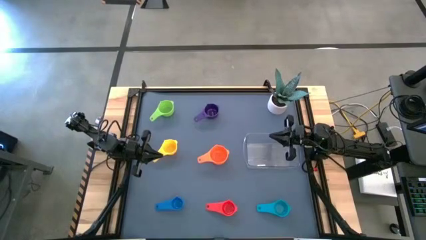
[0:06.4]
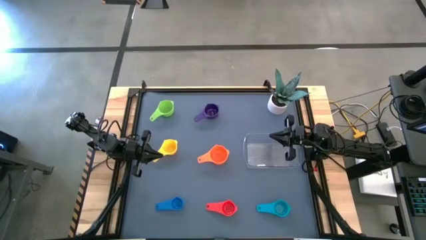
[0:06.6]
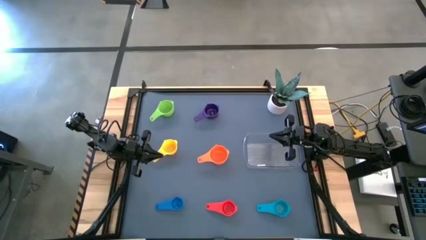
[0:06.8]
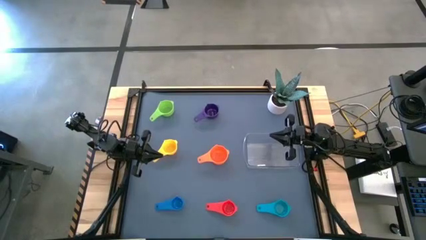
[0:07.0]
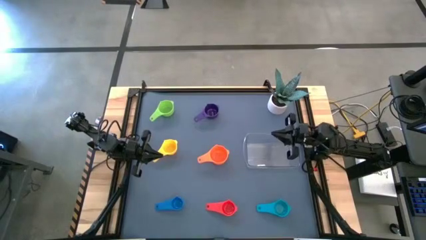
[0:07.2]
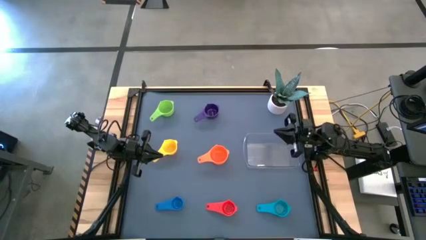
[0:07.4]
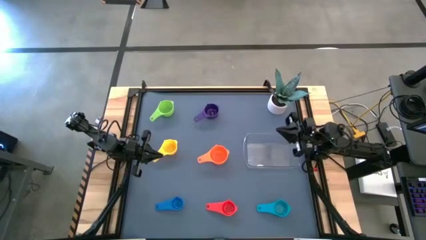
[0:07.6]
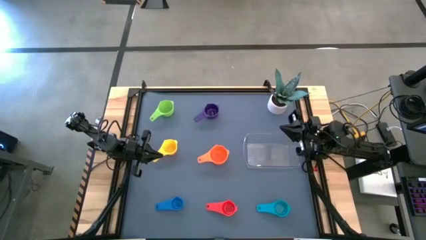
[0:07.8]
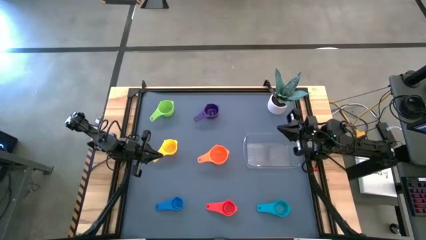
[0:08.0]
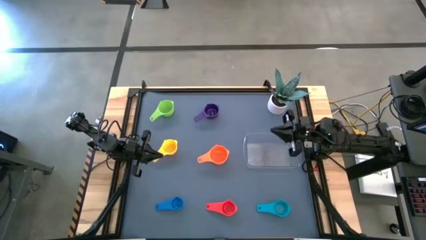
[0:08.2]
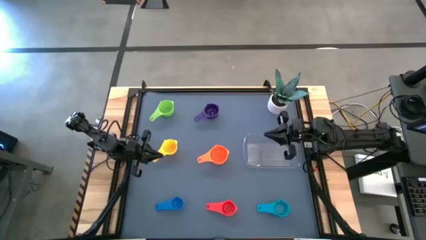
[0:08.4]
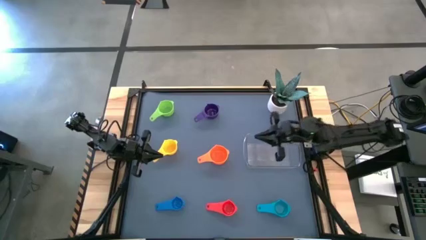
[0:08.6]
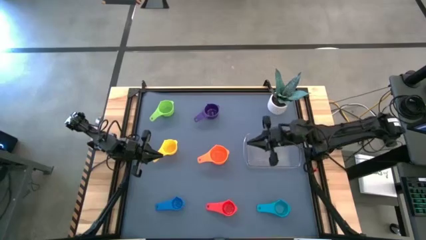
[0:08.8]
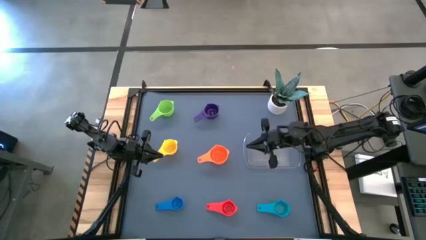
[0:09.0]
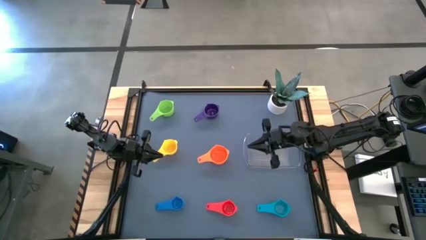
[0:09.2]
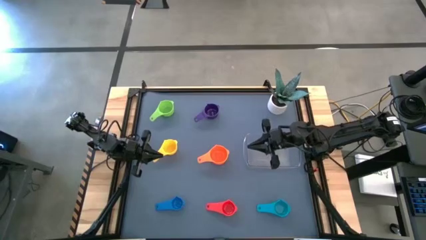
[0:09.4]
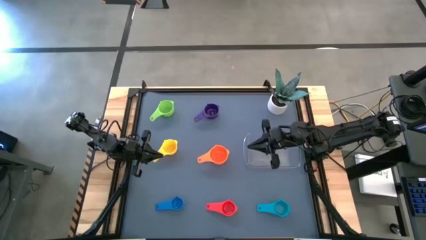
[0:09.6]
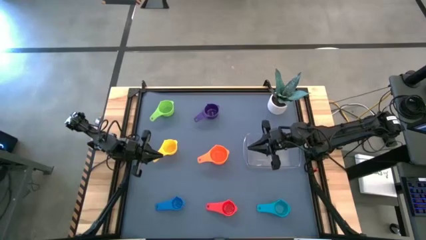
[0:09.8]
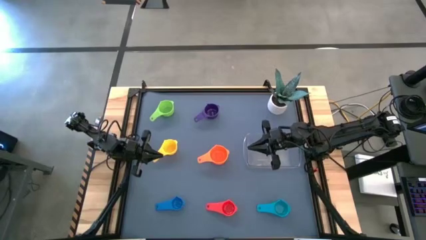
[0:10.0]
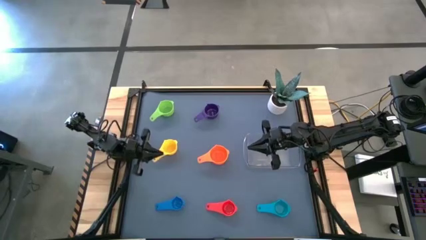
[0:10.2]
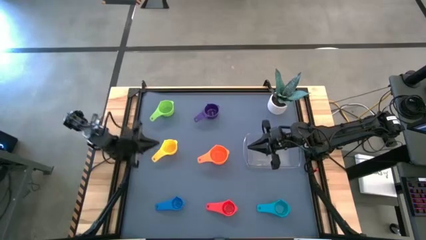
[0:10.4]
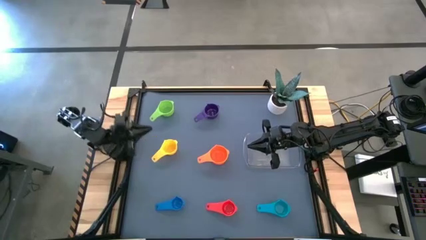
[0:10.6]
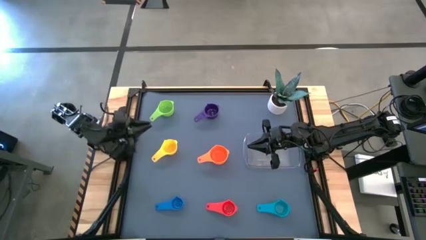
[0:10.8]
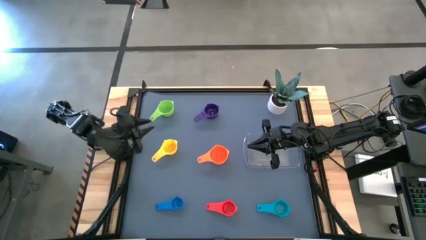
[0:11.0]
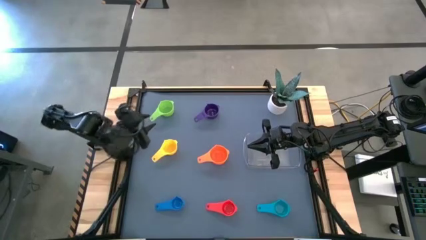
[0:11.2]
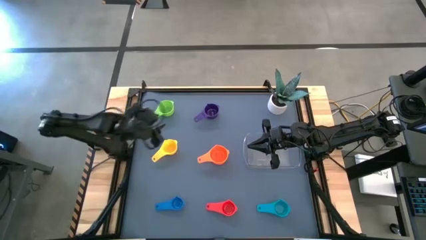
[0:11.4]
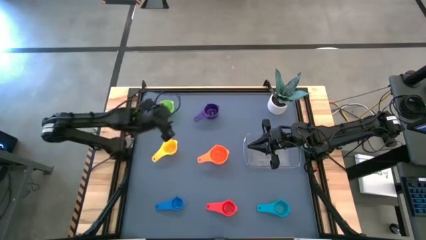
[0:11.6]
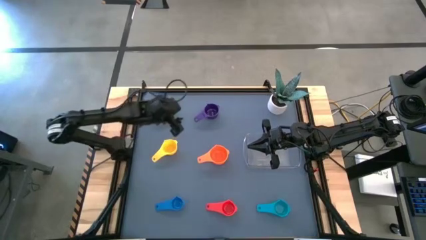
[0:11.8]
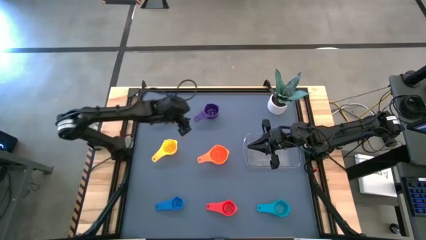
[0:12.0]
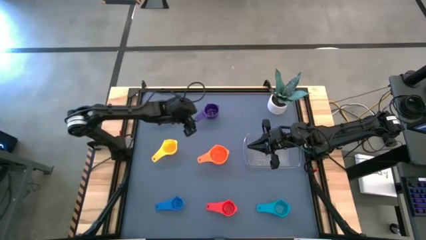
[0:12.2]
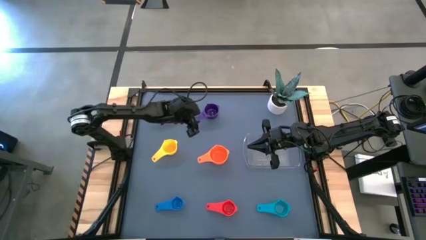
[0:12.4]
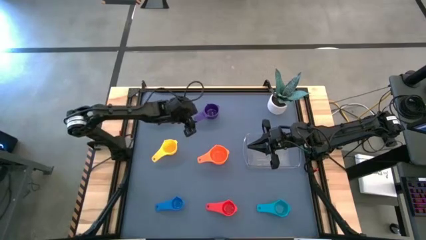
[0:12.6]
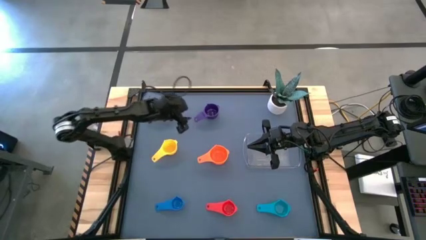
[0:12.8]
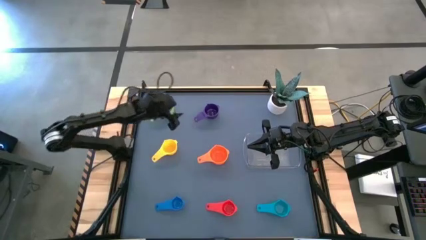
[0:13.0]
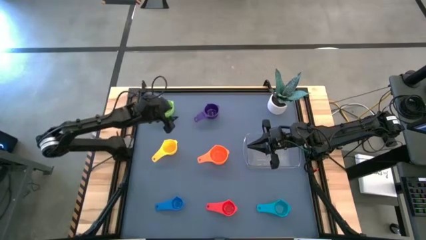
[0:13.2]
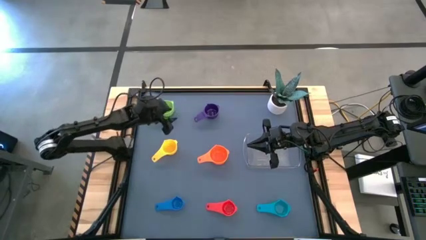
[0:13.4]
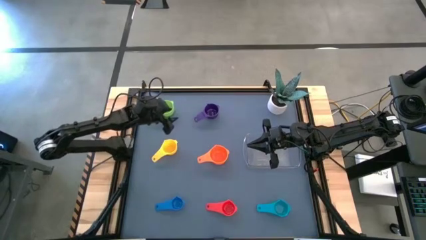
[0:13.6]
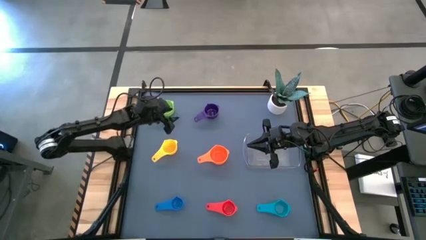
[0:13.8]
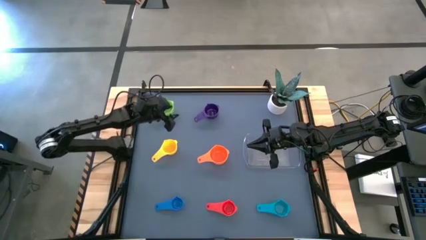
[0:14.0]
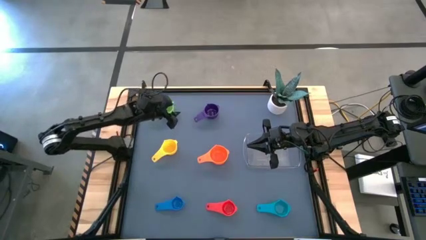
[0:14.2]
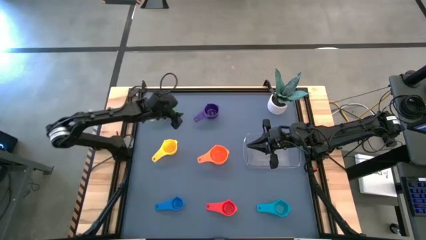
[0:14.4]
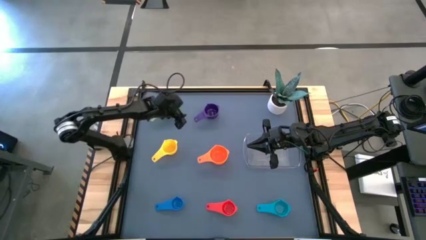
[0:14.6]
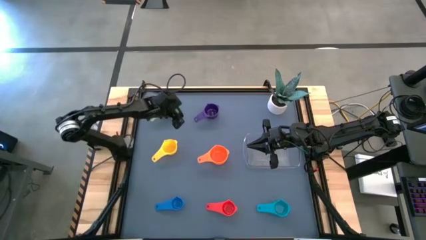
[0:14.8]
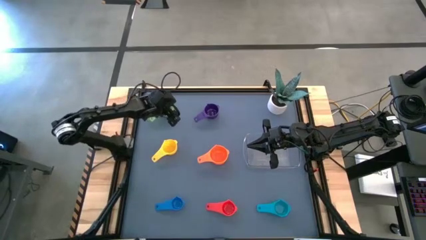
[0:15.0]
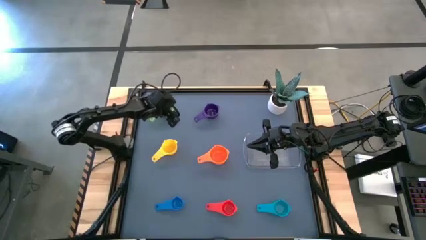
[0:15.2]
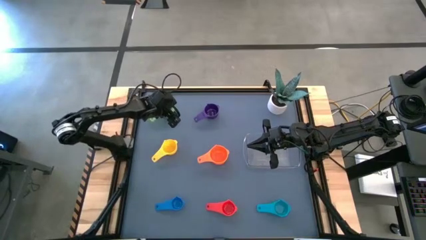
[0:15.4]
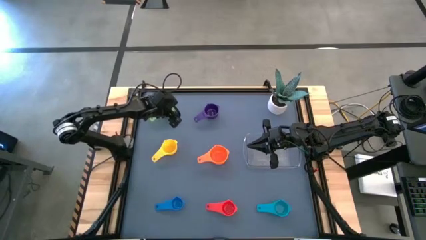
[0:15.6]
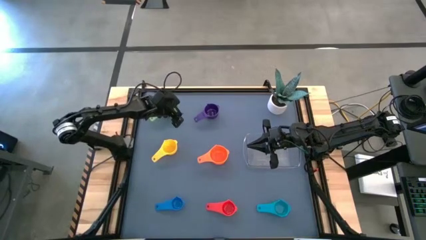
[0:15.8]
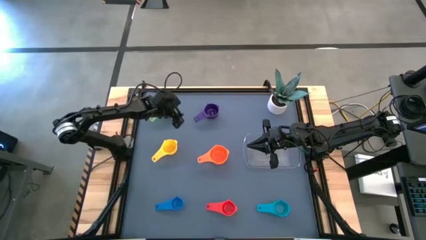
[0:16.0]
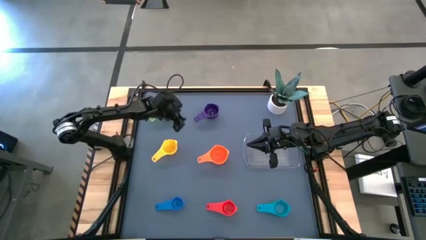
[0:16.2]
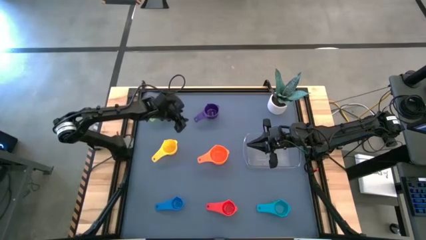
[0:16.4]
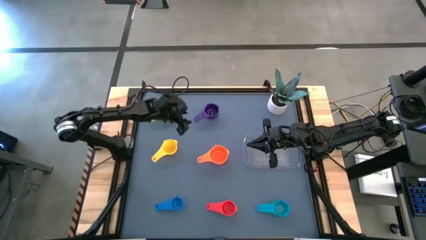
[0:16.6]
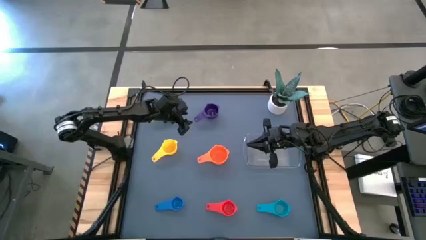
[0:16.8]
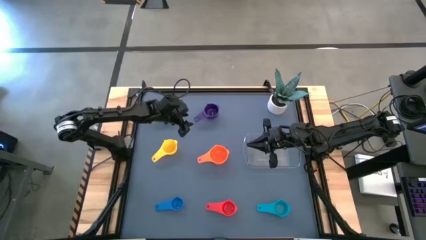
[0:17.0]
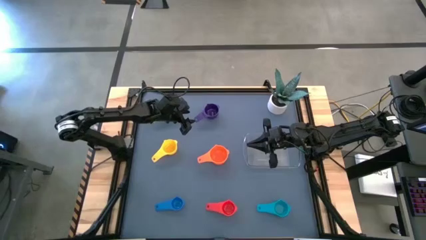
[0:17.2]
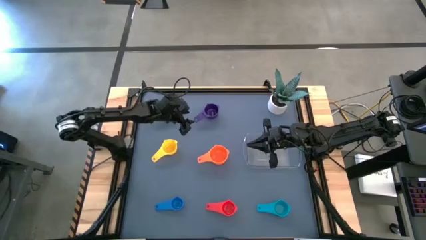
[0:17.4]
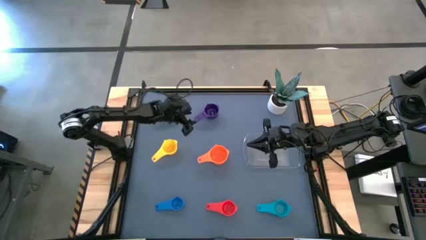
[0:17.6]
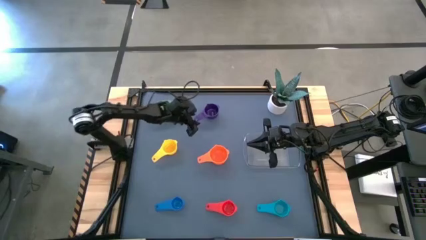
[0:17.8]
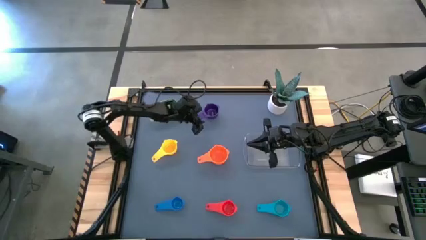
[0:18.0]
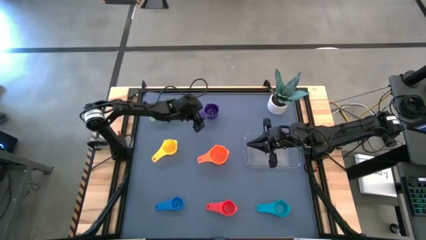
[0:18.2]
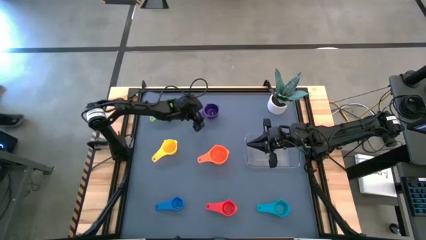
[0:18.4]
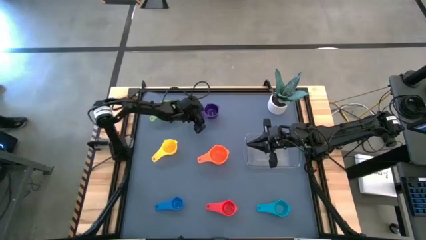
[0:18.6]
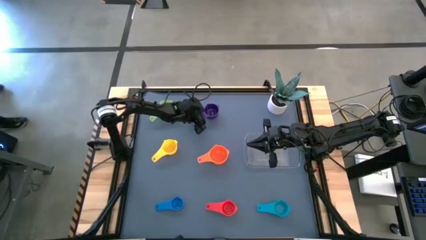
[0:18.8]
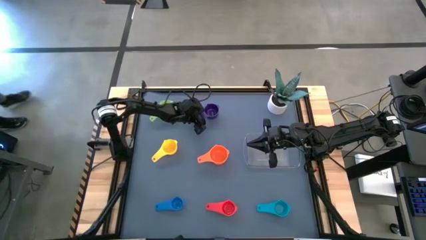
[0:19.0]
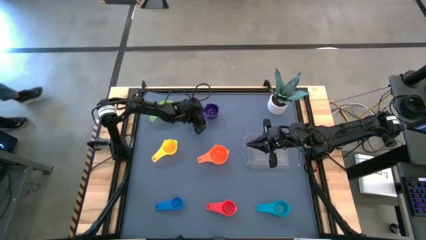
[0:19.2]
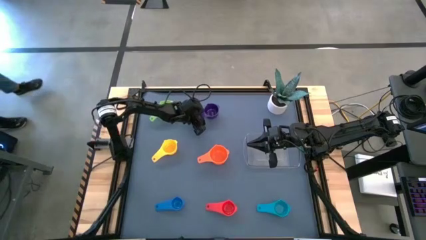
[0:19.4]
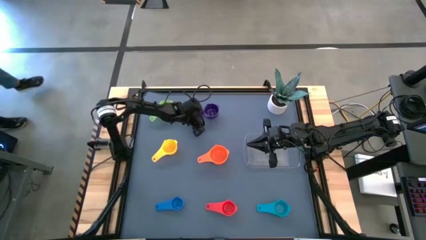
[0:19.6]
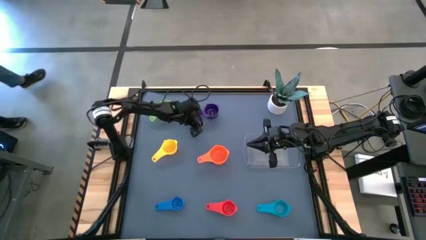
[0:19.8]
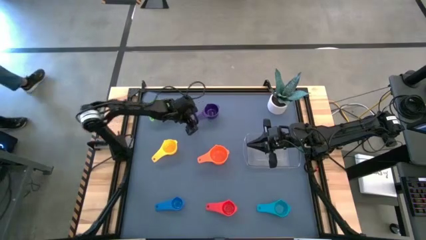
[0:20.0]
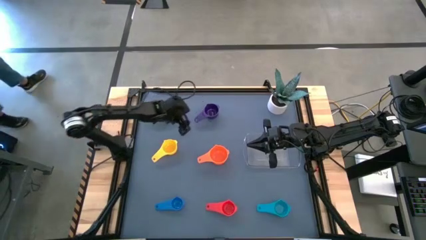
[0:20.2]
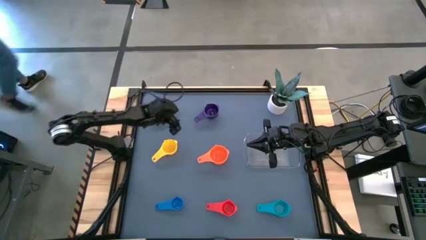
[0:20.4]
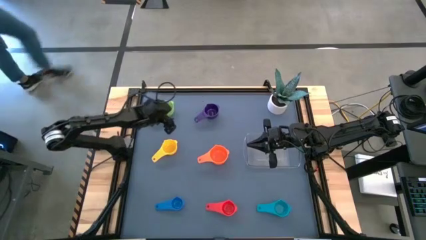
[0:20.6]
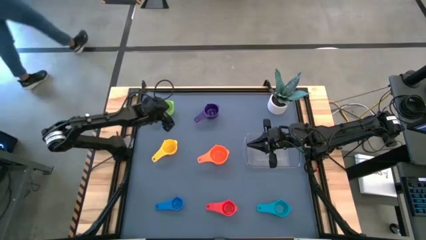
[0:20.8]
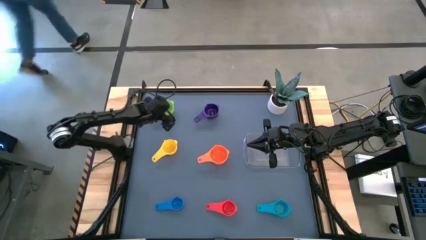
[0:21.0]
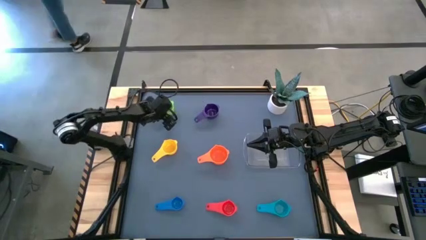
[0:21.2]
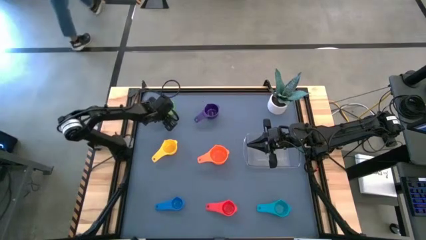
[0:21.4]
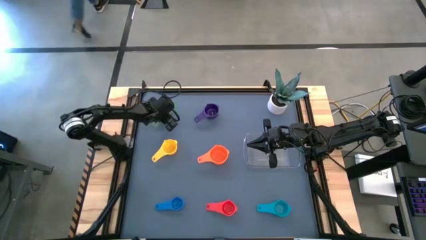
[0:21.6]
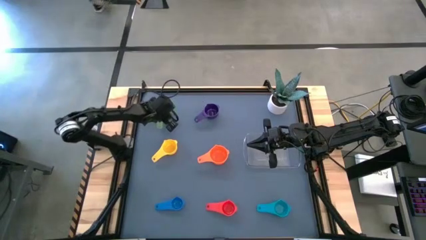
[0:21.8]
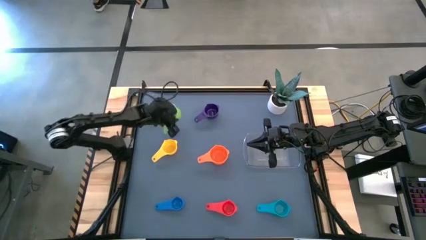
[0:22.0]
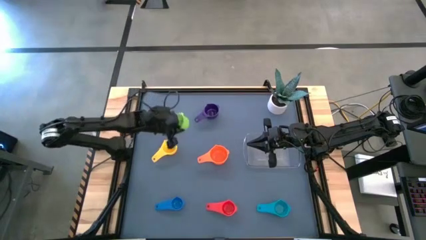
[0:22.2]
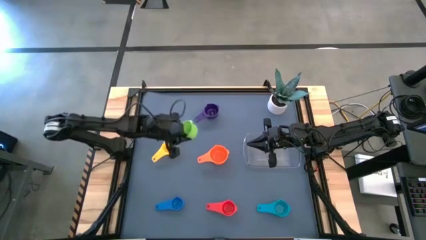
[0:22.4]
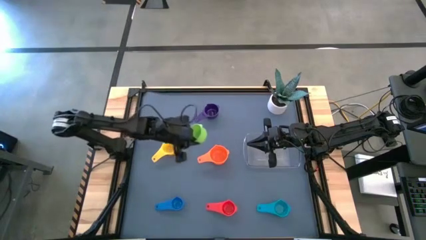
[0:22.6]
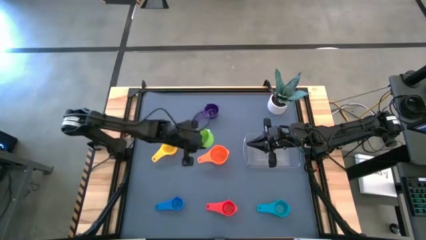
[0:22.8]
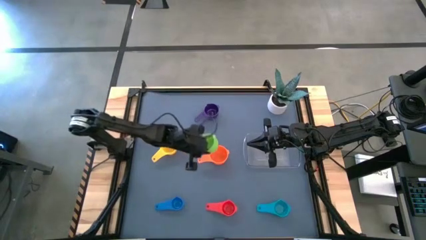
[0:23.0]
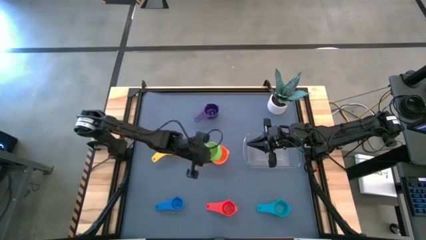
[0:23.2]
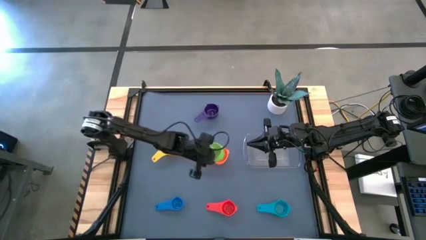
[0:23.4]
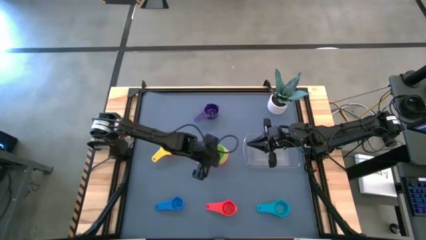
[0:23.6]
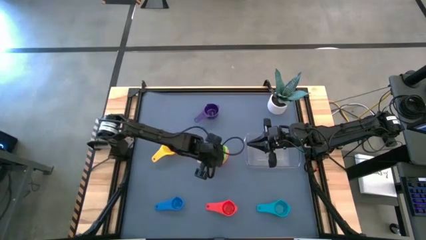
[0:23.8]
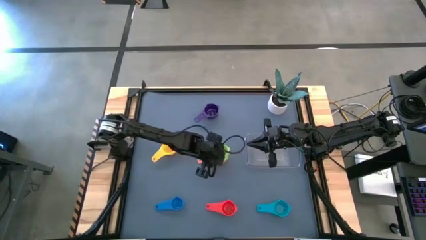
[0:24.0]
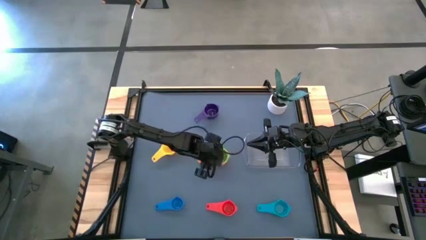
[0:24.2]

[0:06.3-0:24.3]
Task: Nest measuring cups in basket
Stack the green measuring cup on top of the orange measuring cup
